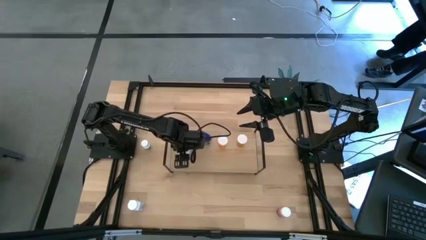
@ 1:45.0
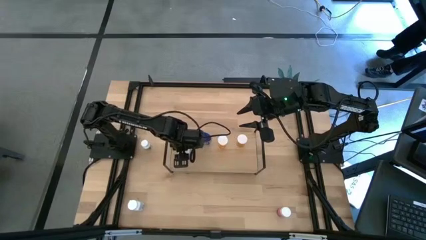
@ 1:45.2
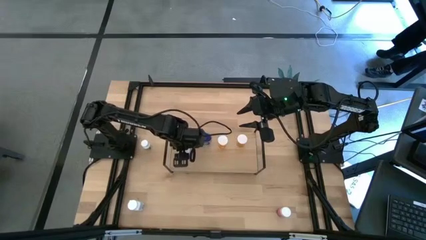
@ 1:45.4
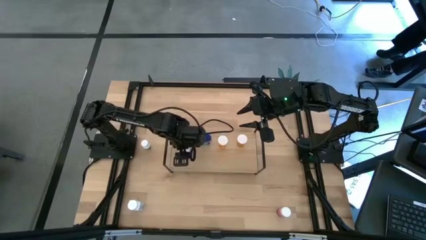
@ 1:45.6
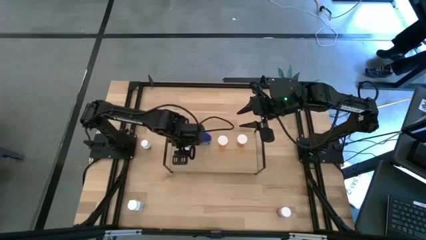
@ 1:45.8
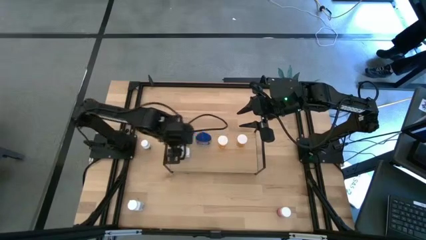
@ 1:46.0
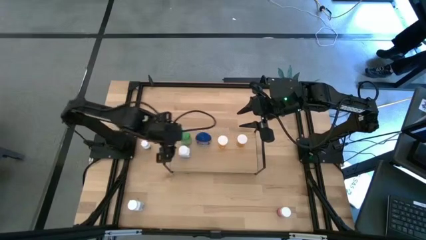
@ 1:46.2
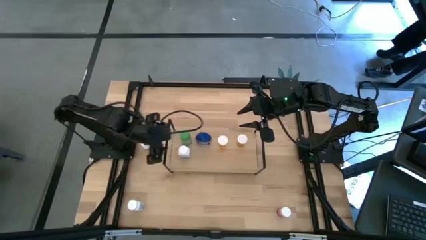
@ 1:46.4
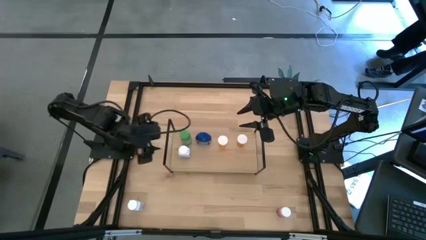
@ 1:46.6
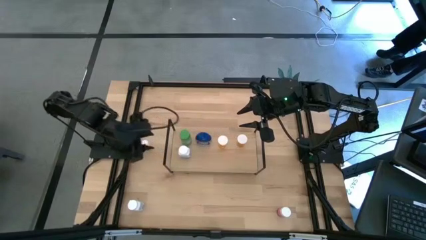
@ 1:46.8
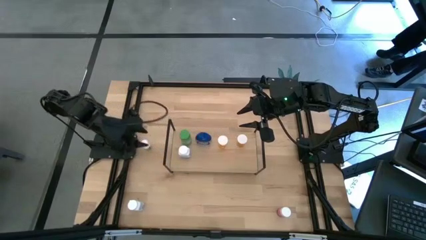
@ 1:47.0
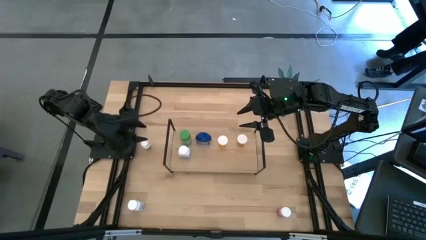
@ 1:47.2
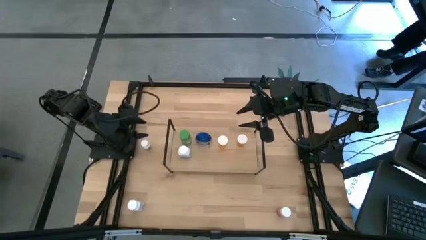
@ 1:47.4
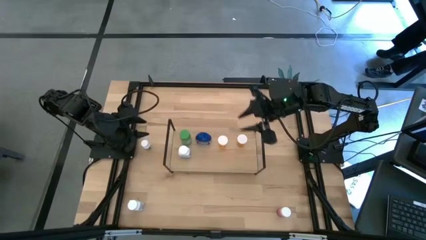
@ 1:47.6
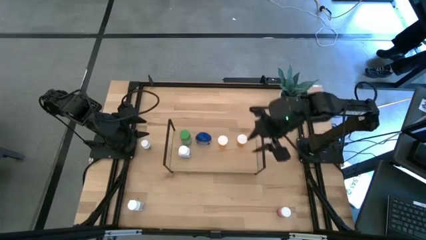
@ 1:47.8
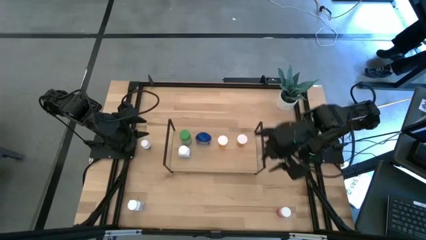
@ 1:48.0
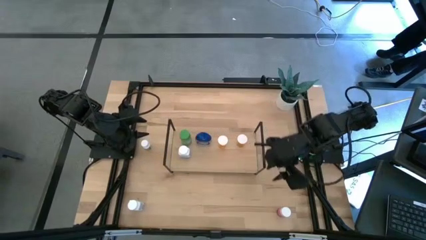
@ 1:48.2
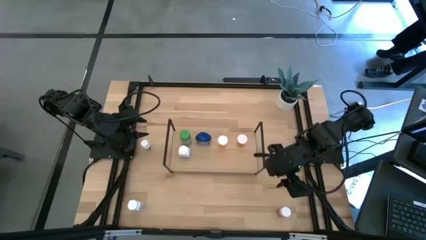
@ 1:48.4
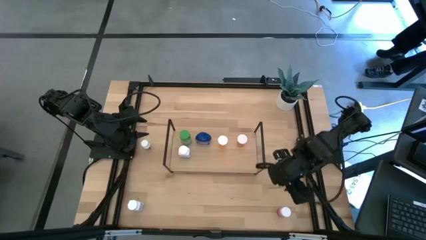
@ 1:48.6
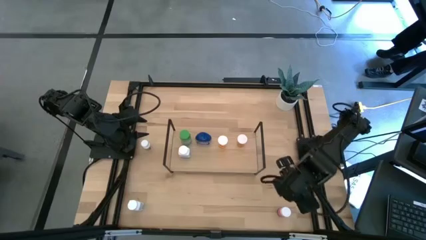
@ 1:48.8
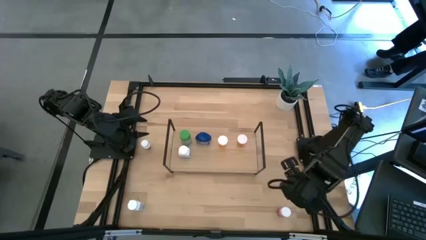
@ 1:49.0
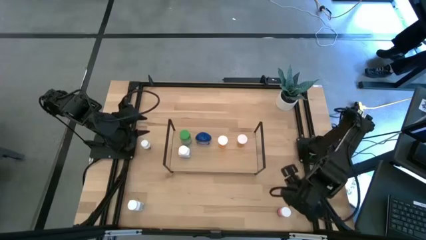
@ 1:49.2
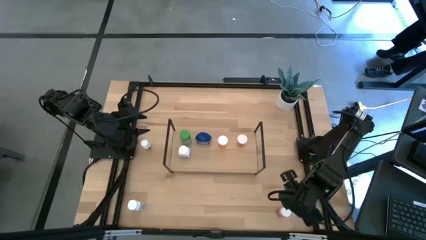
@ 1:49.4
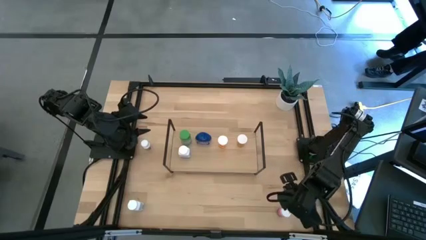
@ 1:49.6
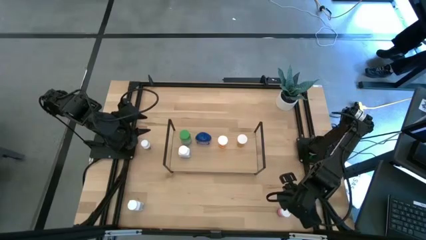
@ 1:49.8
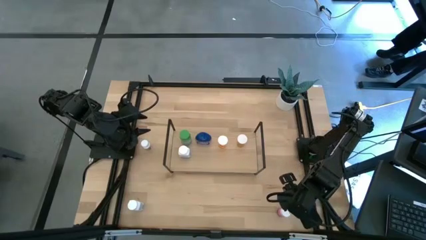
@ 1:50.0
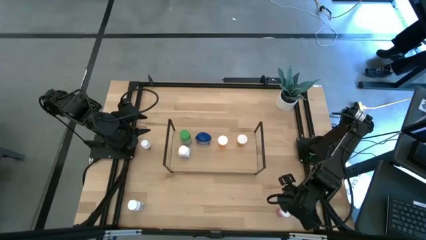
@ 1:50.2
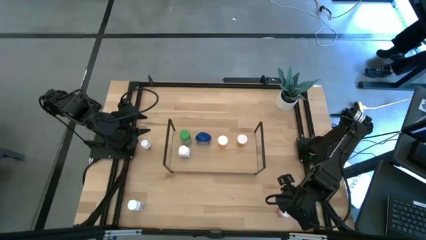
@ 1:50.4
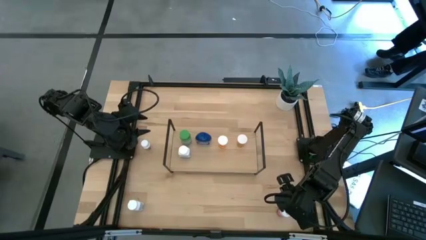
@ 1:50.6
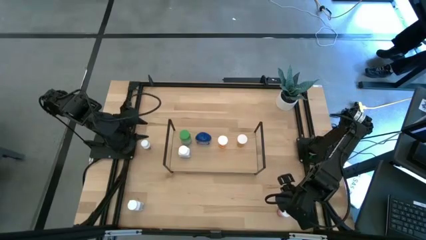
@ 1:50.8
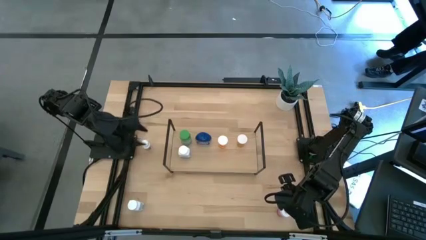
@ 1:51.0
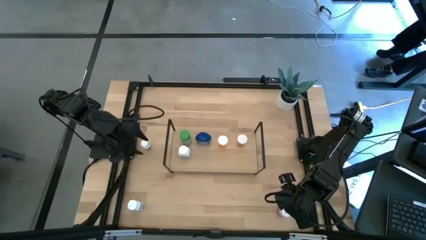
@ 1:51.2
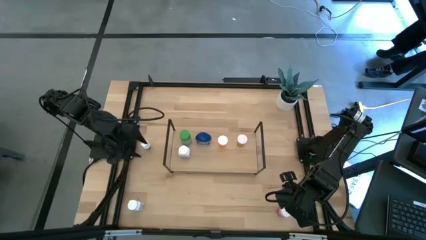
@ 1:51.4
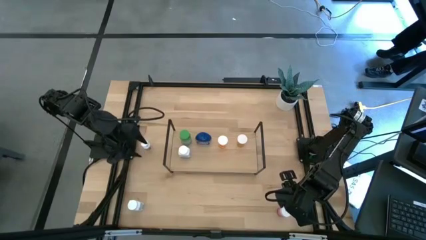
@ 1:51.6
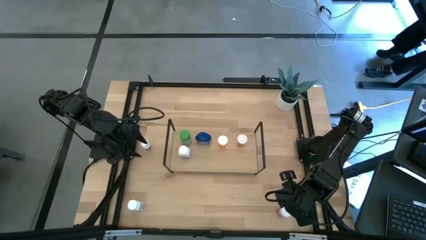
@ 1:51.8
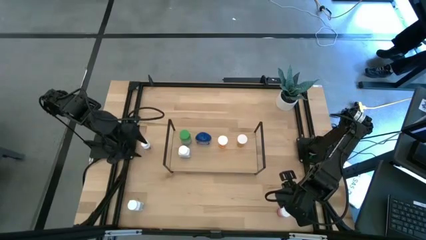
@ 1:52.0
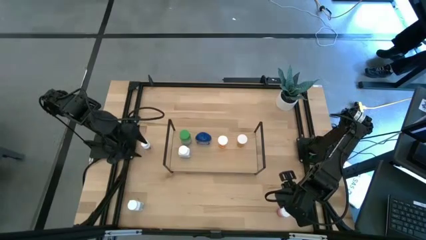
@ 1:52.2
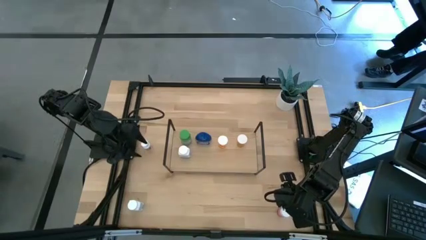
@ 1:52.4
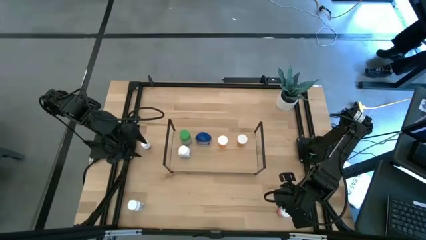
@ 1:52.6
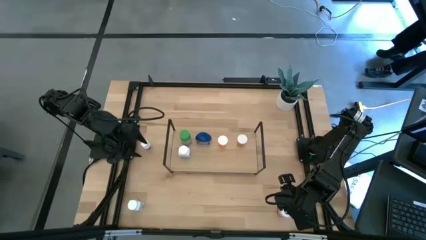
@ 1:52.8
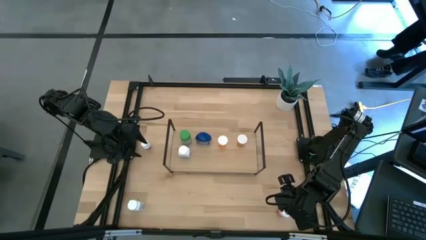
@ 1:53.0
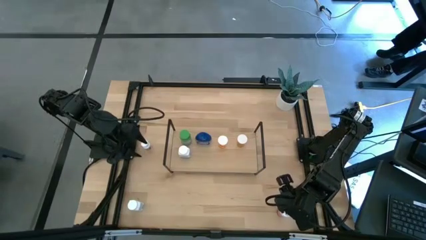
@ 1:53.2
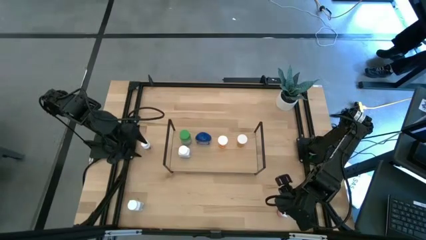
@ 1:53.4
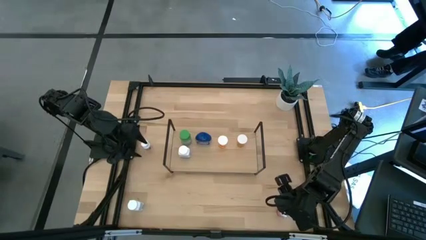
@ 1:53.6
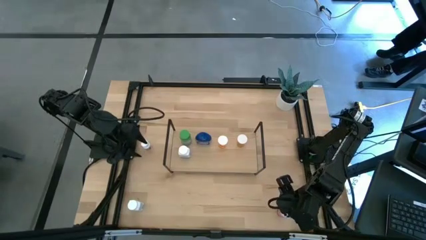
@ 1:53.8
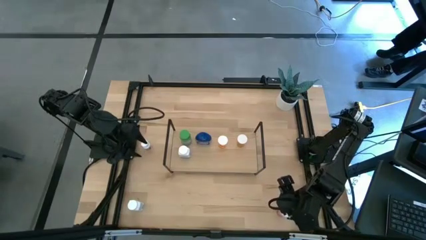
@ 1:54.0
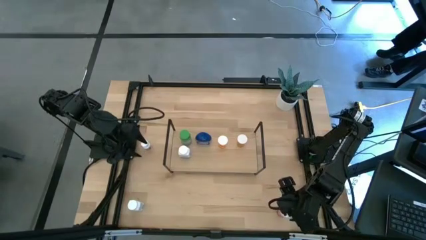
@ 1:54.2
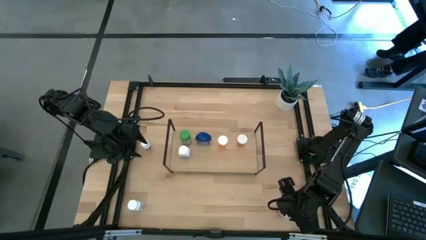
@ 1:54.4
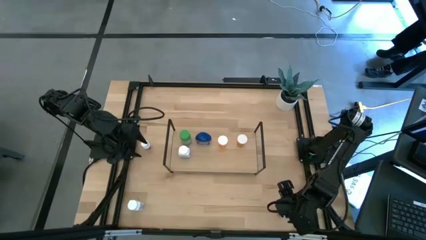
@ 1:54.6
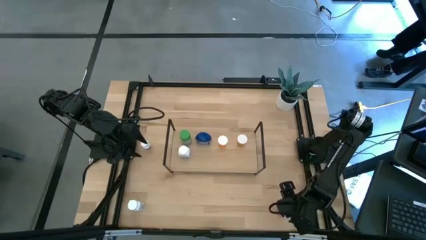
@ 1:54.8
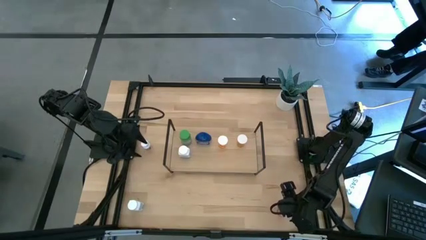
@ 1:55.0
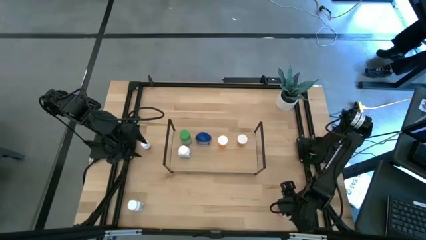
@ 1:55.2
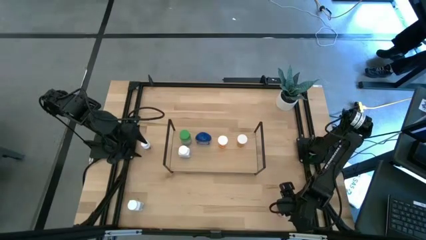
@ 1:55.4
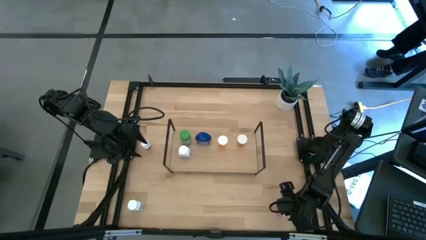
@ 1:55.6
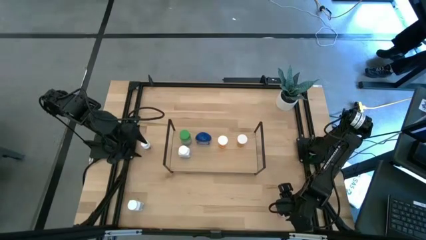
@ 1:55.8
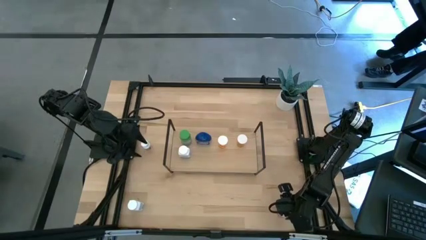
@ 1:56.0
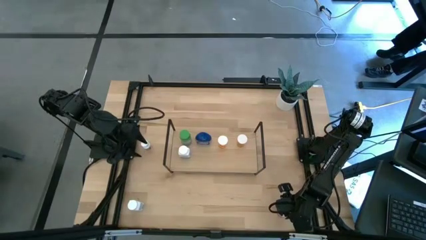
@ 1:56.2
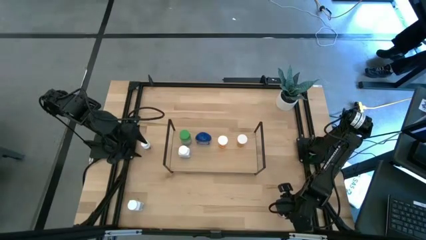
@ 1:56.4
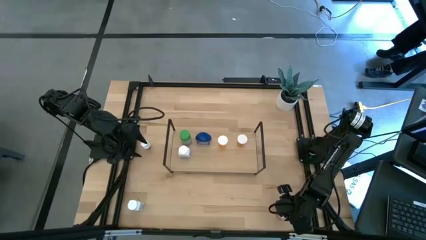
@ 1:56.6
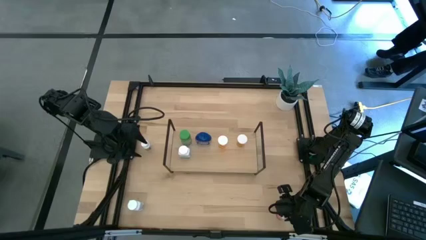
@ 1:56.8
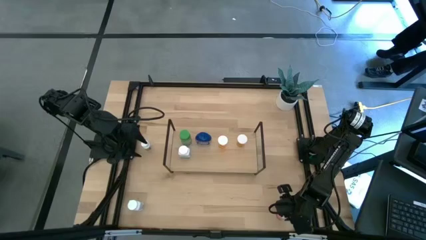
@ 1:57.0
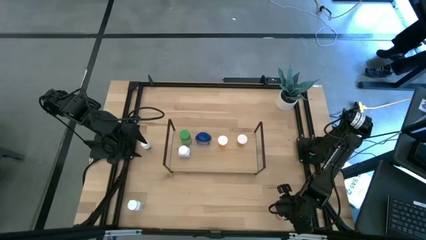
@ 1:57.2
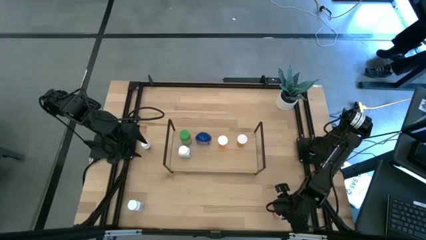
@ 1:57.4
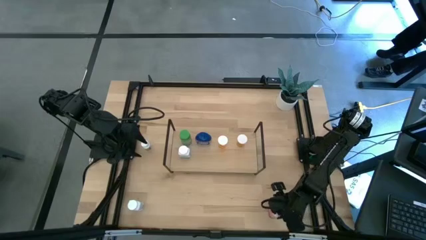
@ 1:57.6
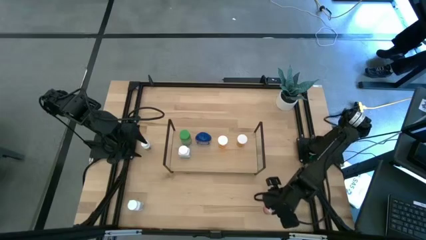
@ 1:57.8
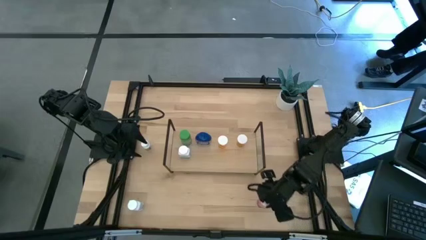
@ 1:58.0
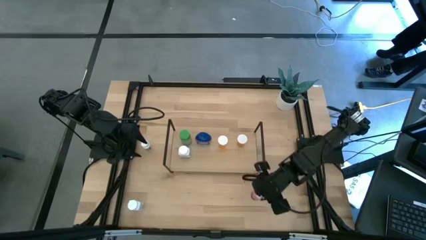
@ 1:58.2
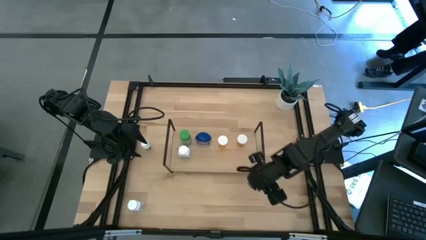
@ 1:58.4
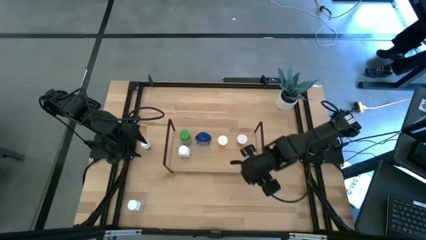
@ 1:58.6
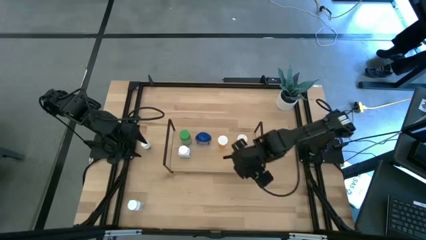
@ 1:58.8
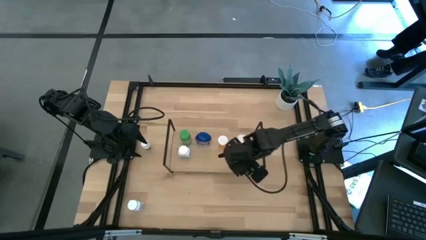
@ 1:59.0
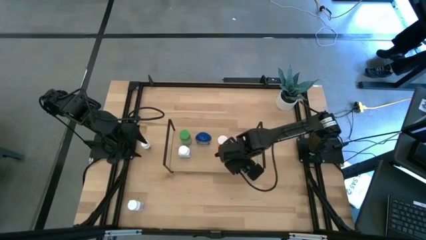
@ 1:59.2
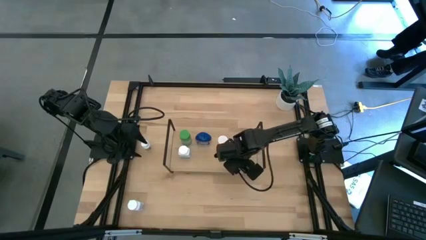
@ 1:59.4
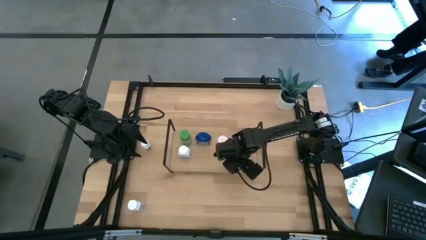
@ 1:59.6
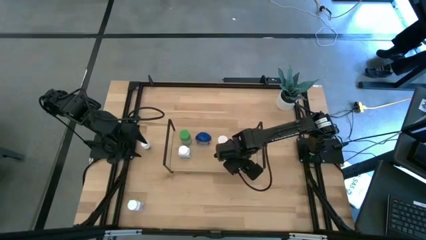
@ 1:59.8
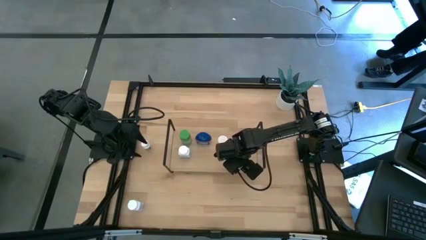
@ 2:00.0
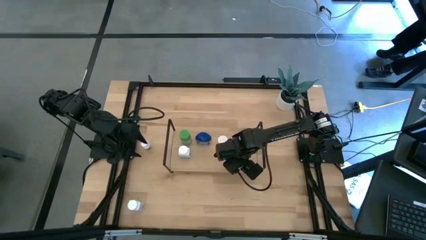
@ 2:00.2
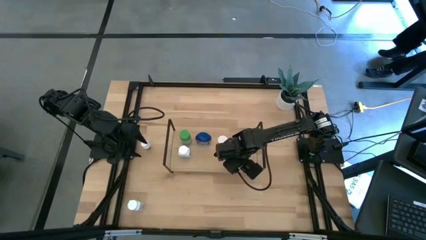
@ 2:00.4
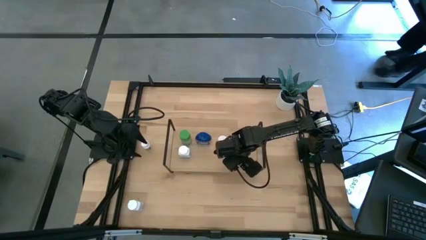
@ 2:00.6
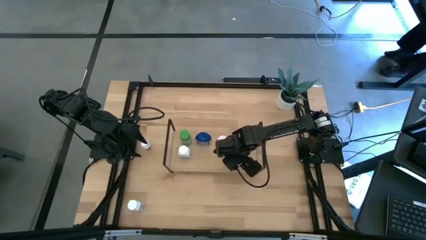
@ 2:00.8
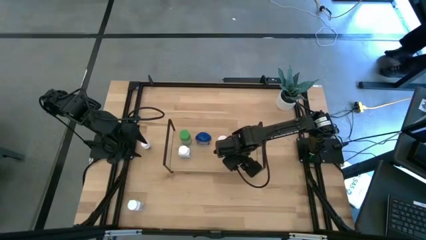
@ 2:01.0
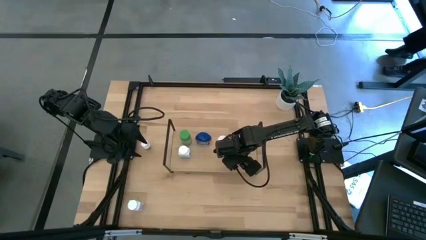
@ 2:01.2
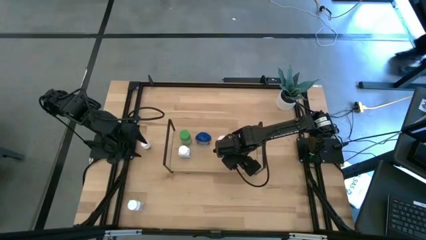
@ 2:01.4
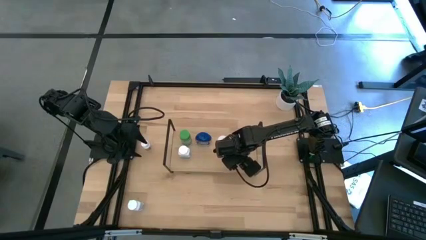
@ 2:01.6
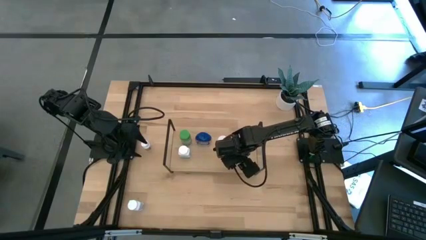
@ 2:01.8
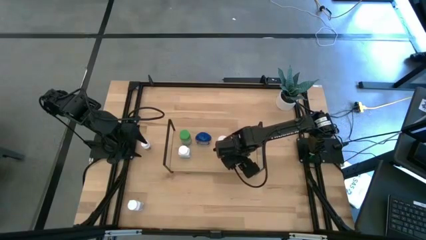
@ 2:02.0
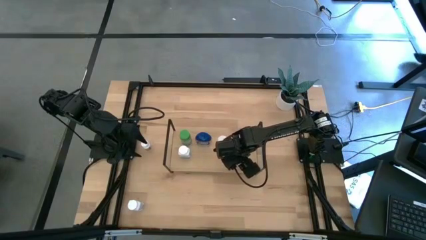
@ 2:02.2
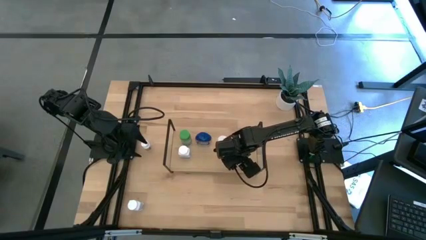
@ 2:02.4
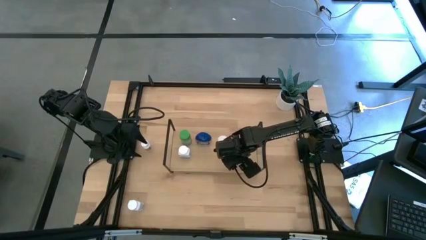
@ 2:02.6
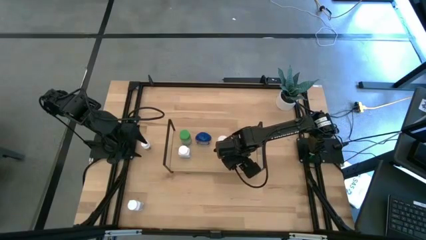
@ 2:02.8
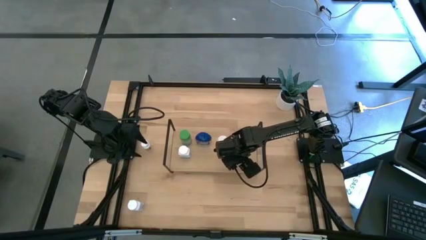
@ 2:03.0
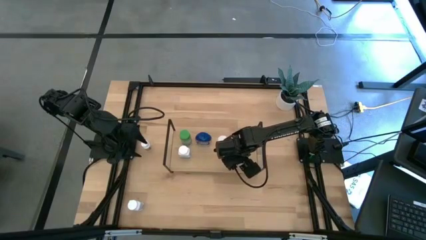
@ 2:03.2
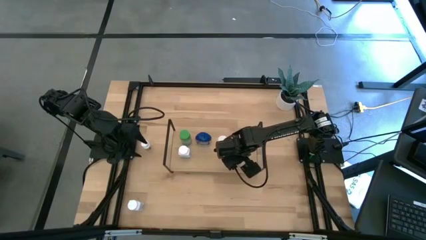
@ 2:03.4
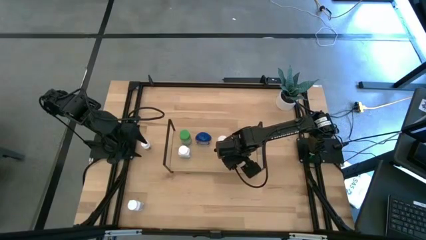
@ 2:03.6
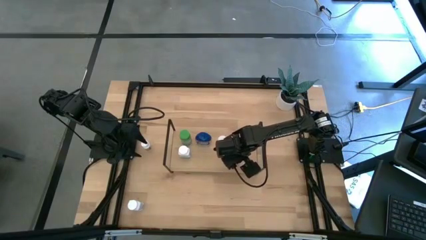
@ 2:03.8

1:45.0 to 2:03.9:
Task: Pick and place medicine bottles onto shelf by color
Put the pink pill bottle on the shelf
